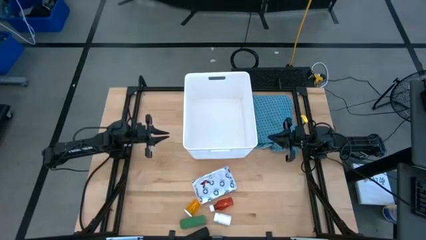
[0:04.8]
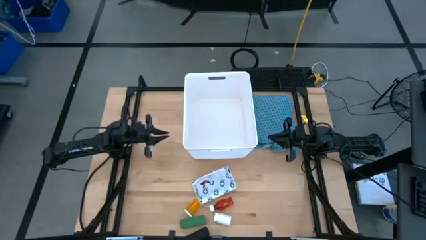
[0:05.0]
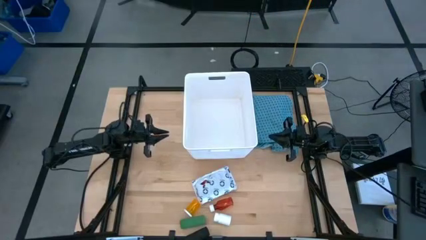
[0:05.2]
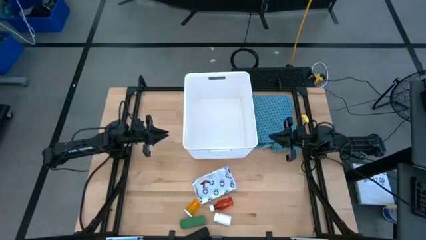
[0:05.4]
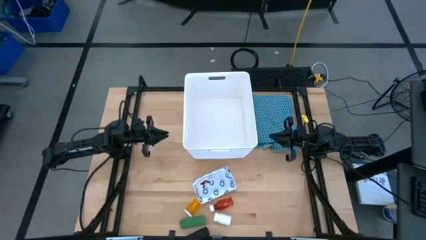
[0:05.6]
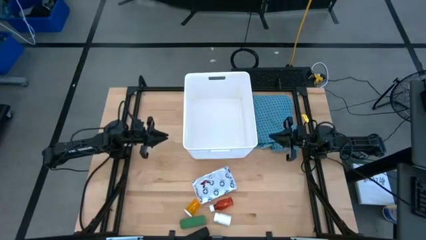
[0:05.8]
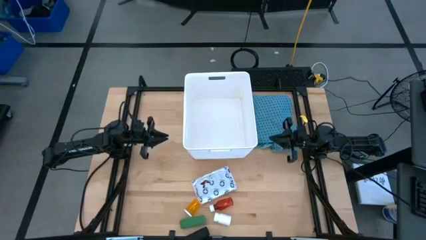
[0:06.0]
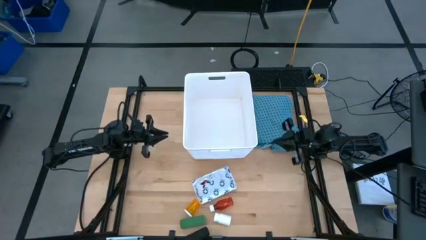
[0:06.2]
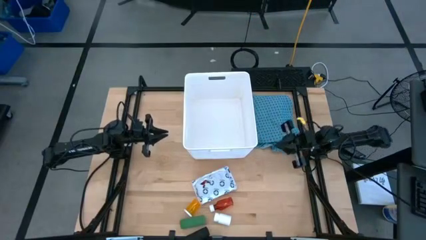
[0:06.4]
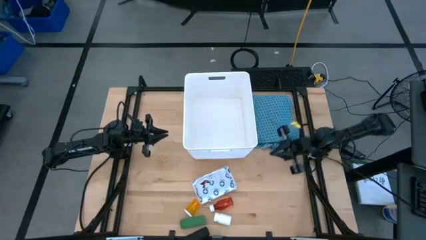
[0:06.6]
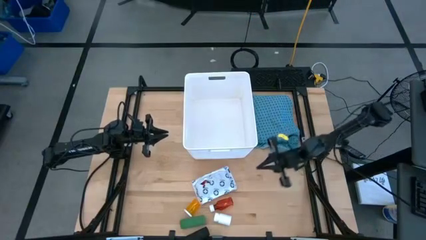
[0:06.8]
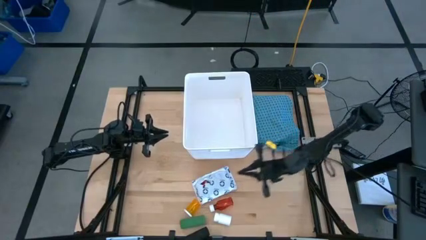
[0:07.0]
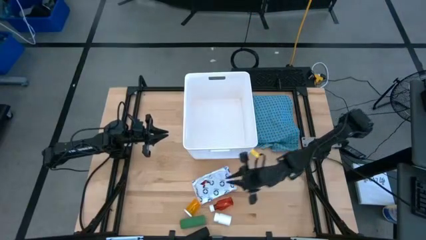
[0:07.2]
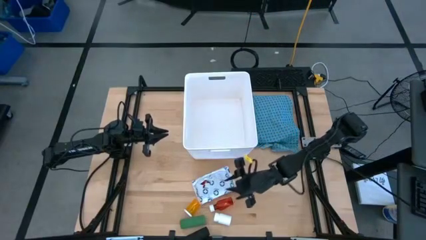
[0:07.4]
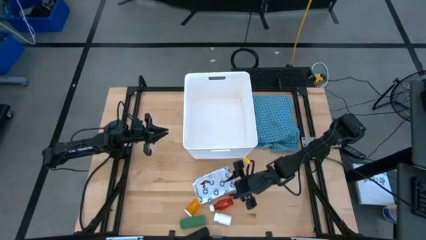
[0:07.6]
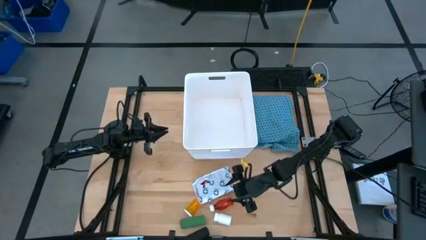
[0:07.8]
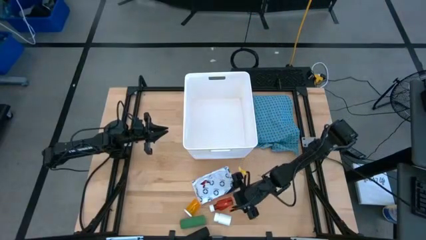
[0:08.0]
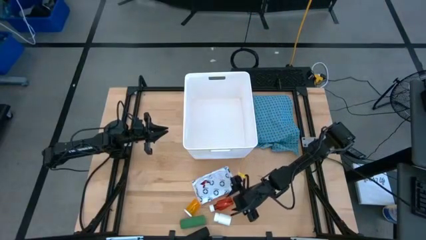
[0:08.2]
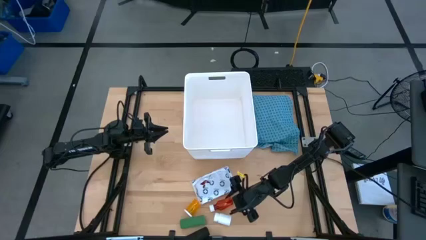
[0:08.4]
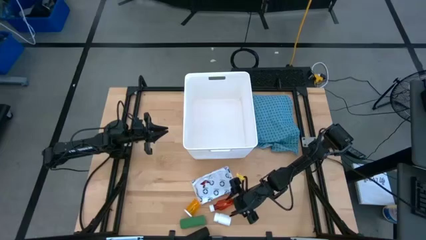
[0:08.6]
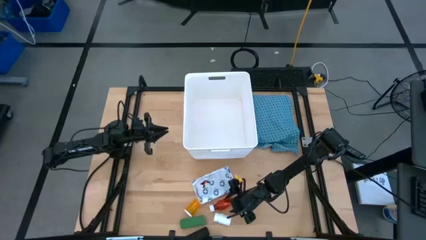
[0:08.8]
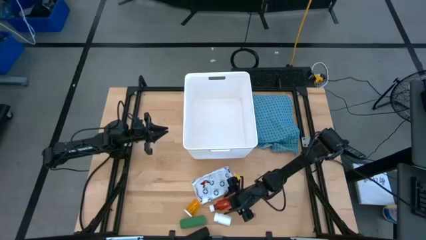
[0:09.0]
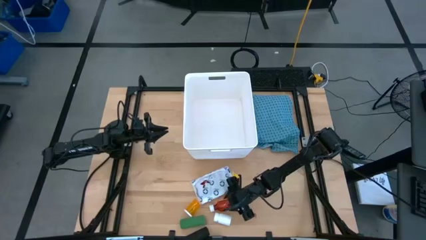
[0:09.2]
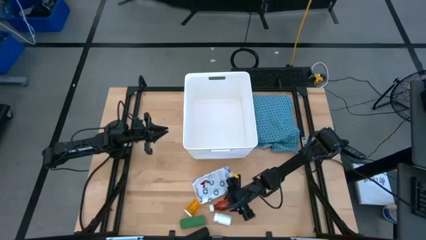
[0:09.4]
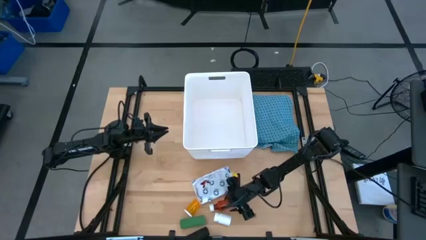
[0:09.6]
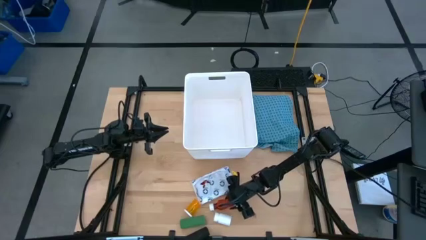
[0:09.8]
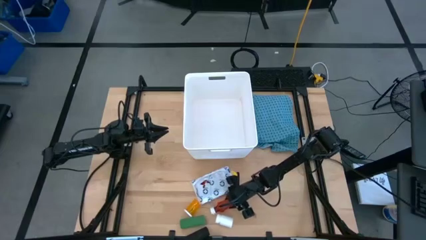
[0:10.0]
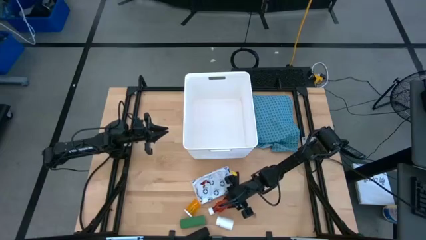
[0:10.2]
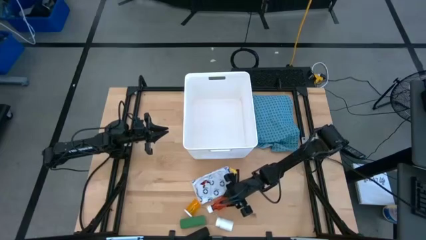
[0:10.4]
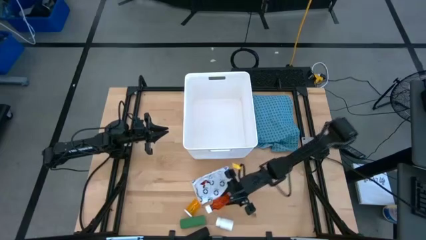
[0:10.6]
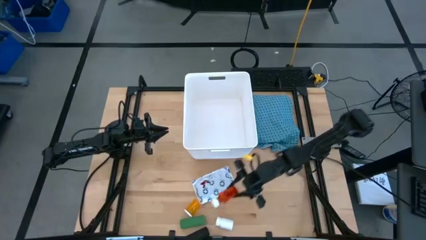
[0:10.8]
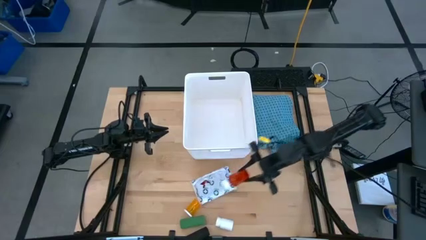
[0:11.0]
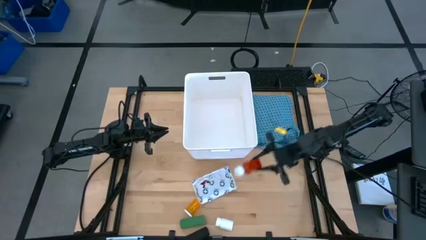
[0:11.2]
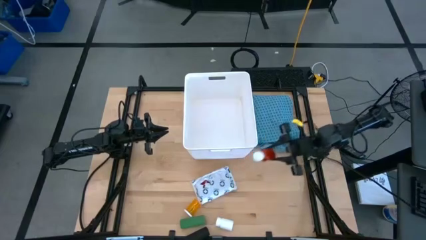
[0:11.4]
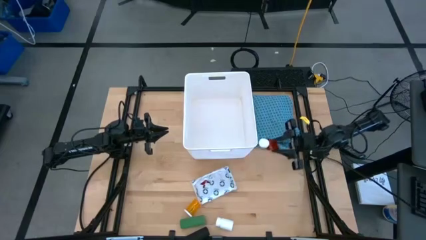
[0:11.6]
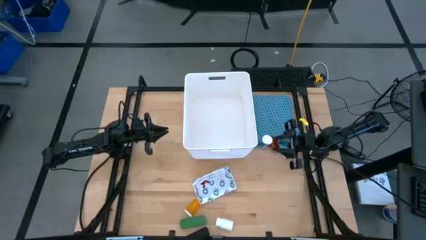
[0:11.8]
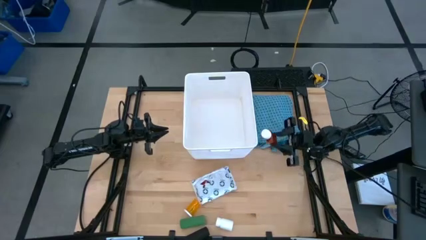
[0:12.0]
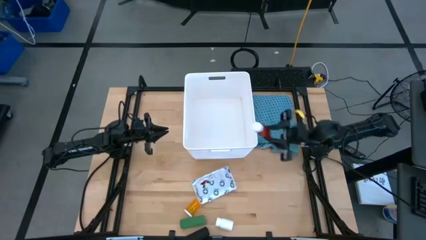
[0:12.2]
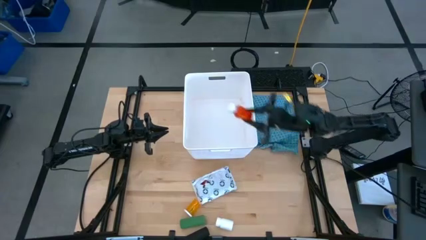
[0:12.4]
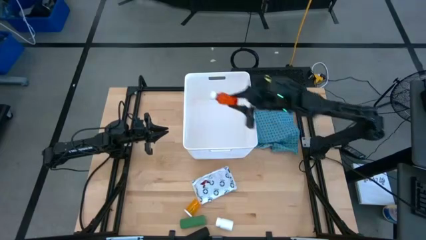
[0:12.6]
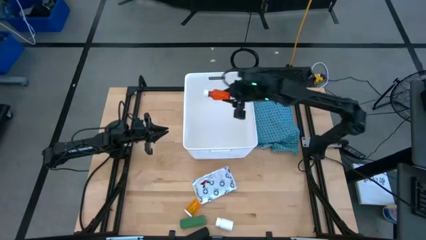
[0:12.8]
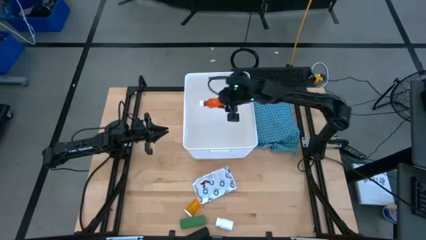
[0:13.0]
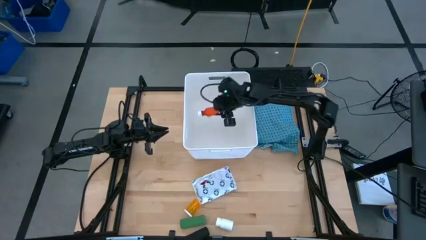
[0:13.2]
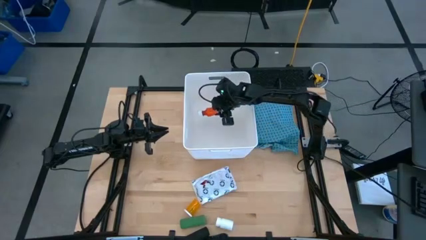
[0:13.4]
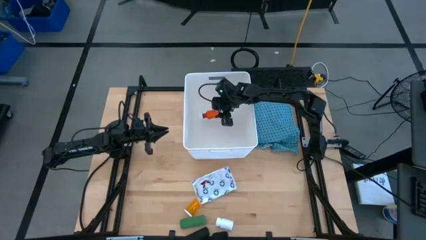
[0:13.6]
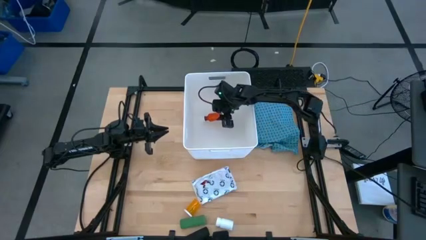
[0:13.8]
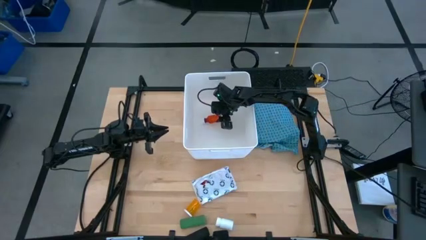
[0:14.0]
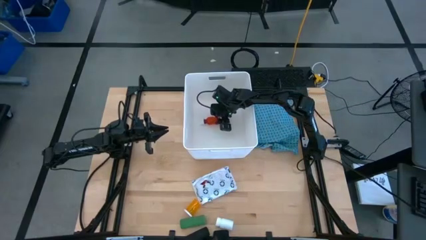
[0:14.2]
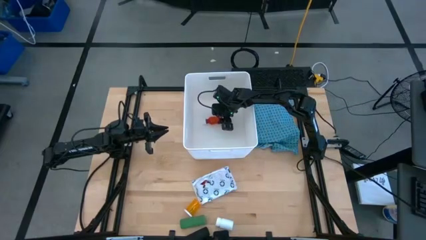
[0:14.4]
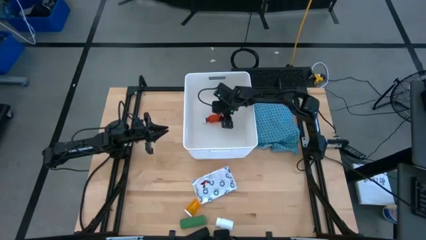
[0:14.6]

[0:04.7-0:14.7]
Task: Pick & place medical supplies in basket/bin
Put the red medicine bottle into the white bin

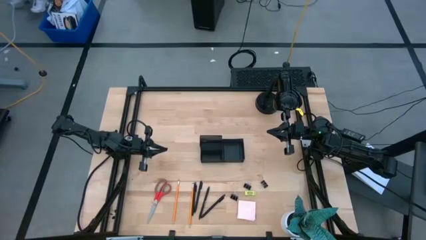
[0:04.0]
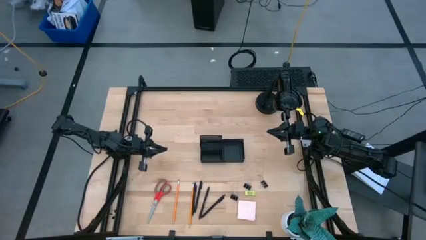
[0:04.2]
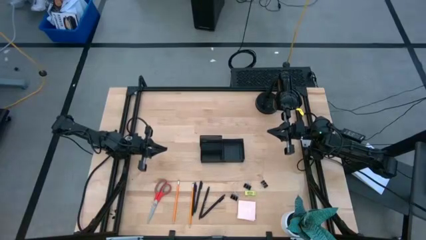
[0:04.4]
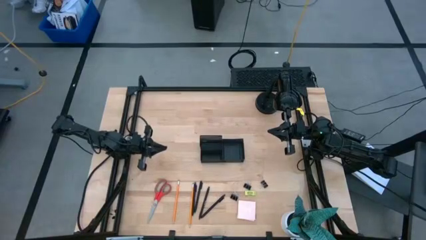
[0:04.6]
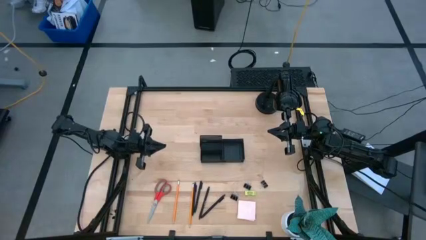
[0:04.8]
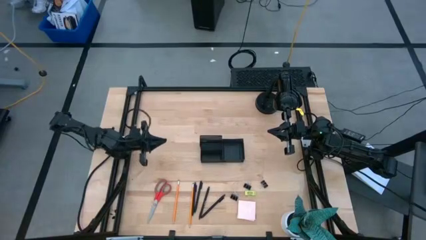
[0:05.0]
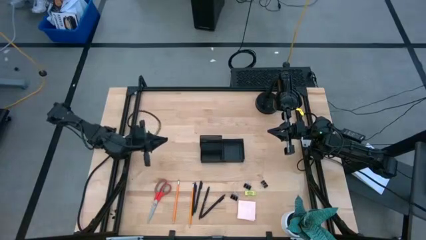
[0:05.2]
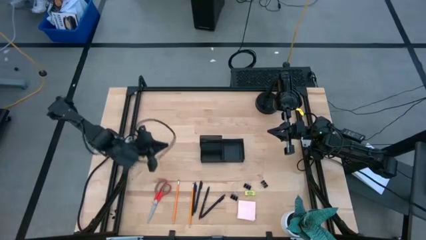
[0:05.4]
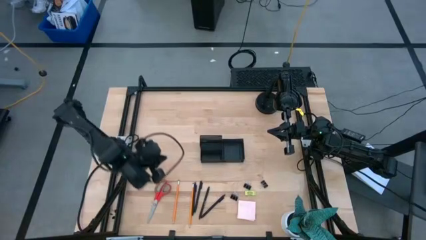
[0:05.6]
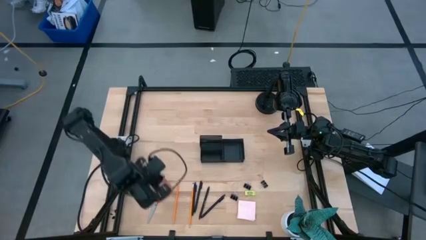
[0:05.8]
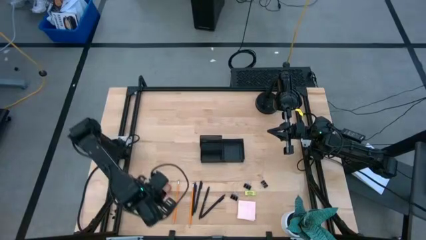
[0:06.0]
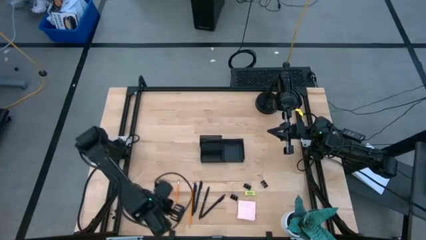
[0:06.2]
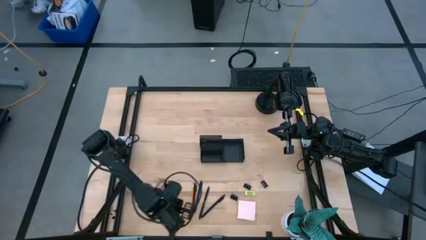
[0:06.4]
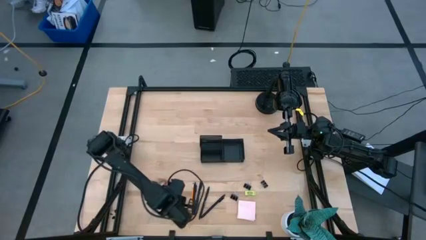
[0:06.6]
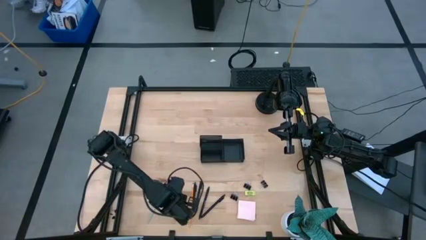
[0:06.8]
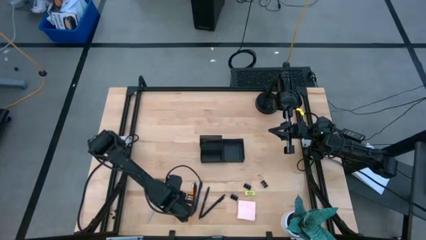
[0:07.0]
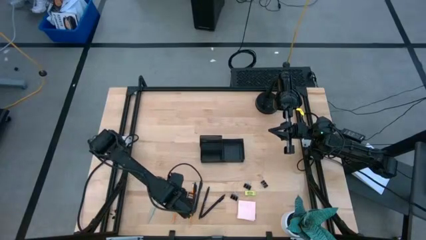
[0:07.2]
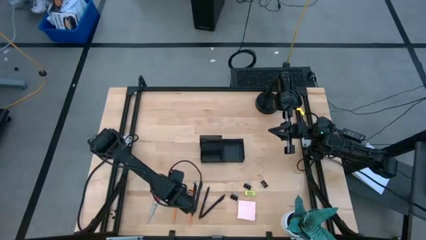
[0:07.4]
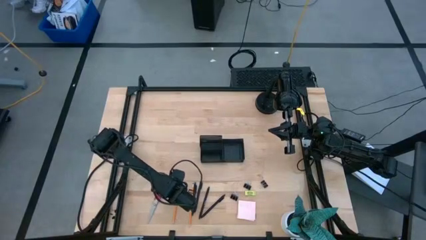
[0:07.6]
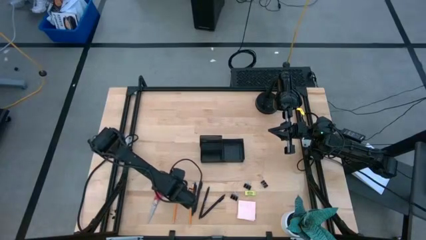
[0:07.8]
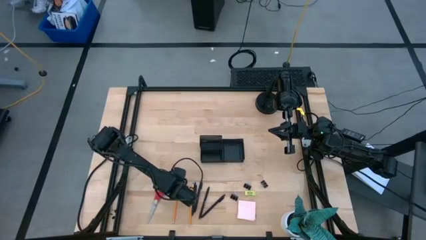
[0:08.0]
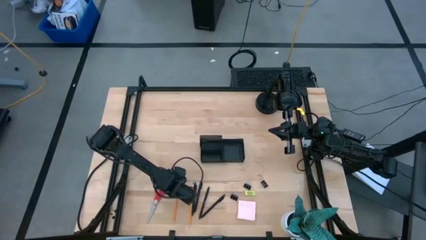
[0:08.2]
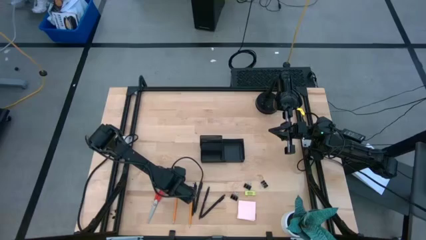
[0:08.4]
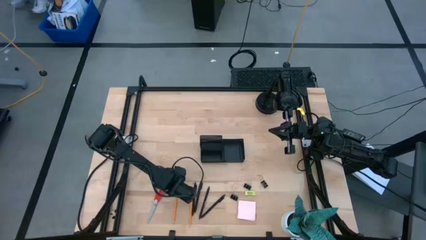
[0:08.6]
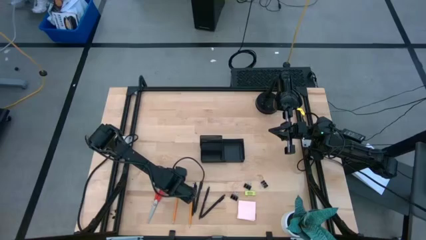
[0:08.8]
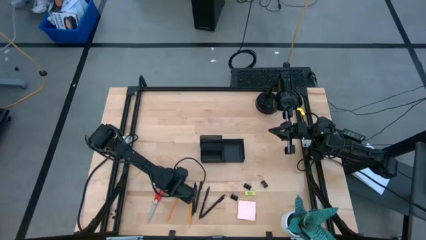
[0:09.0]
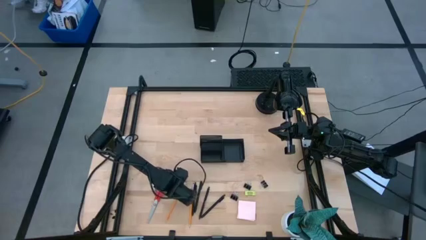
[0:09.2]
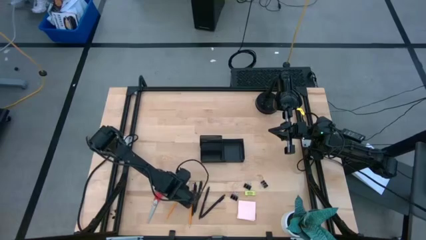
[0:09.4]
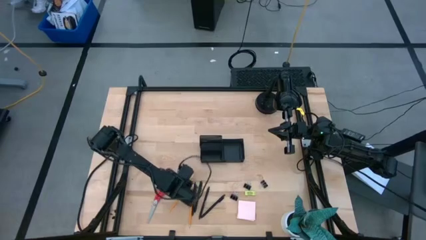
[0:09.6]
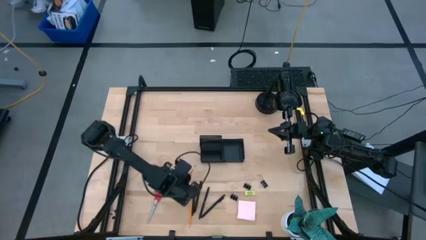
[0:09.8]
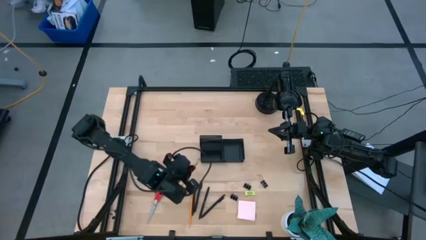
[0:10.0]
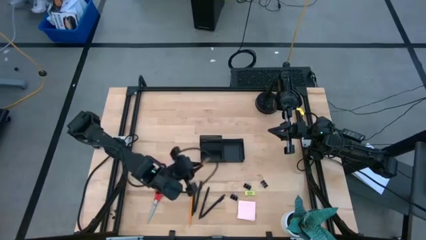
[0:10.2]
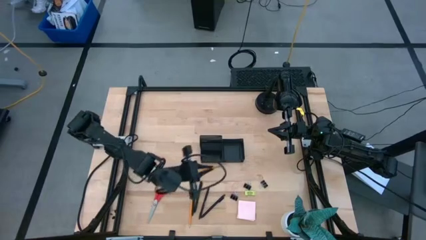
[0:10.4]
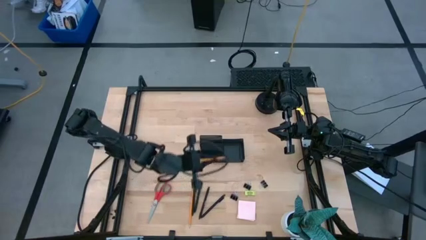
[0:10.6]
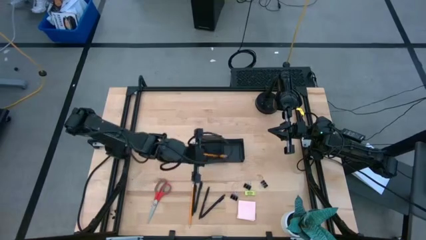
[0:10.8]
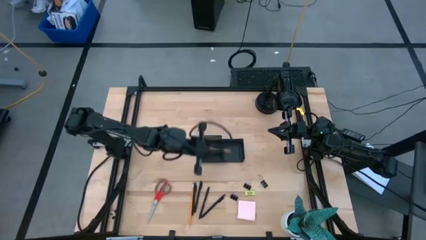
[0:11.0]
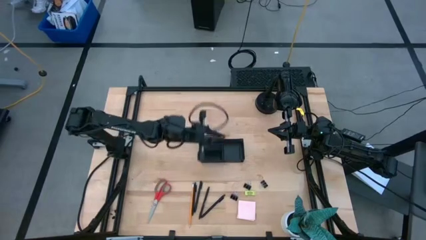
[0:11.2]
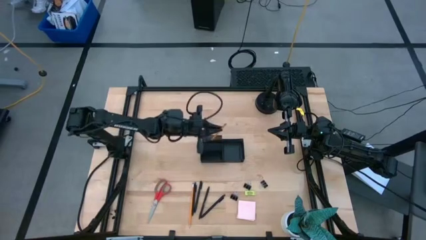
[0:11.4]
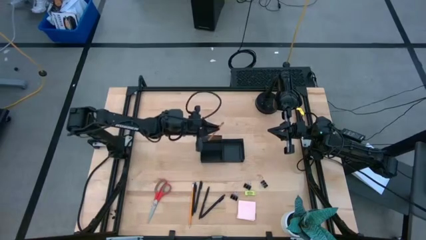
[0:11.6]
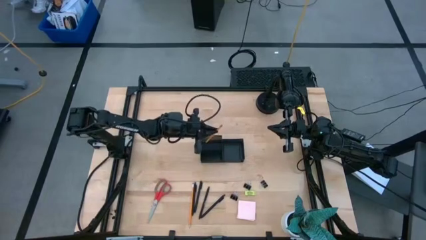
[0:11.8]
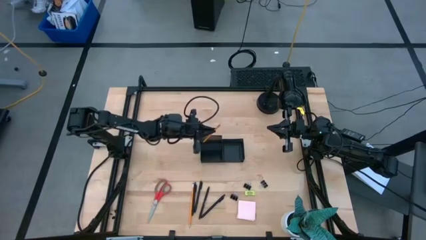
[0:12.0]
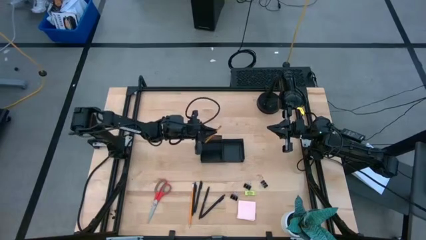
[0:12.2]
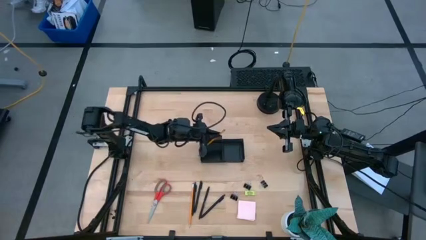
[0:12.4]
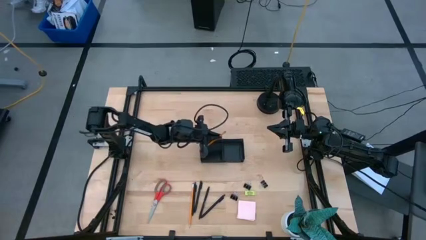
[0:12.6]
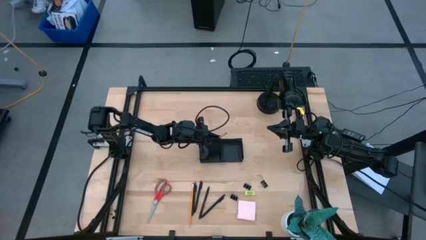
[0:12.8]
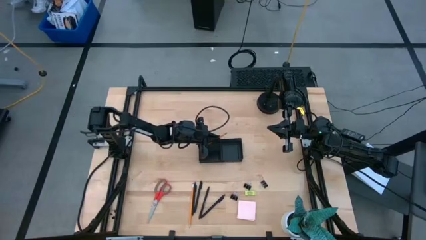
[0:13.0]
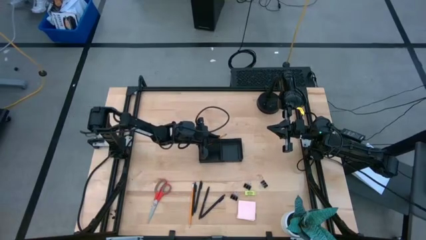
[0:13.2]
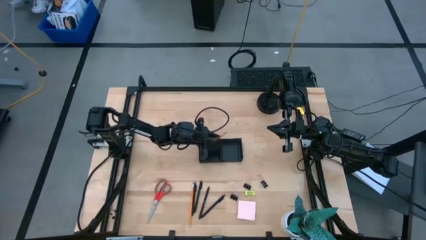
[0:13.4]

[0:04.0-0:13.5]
Task: Pick and place office supplies into organizer
Put the left pencil into the top left section of the desk organizer
